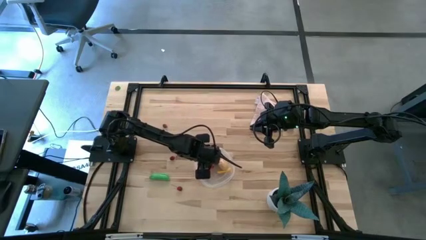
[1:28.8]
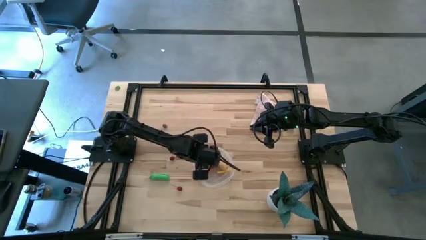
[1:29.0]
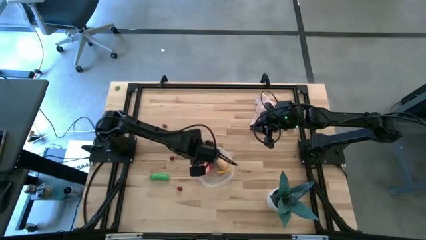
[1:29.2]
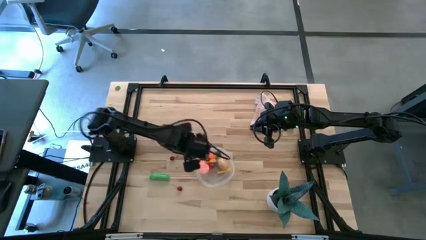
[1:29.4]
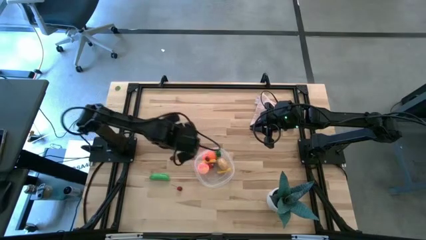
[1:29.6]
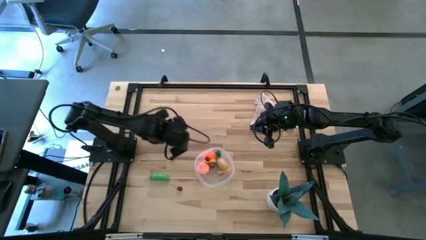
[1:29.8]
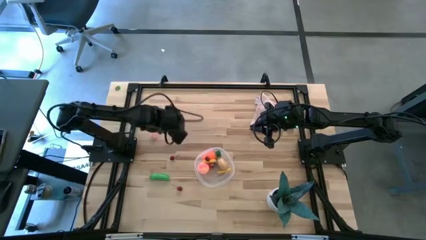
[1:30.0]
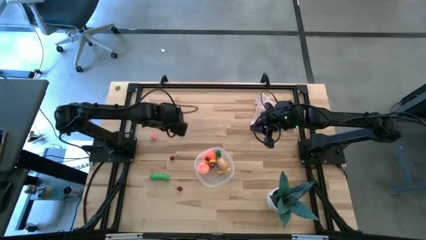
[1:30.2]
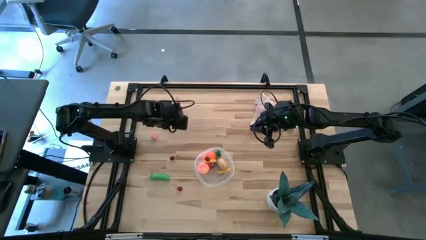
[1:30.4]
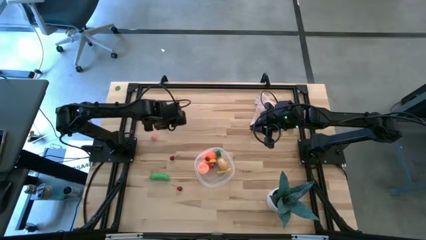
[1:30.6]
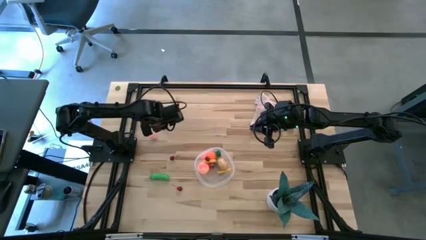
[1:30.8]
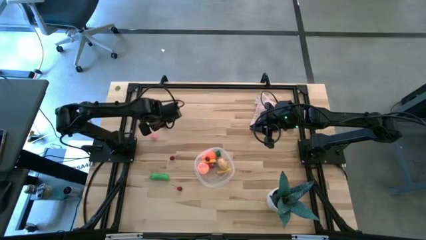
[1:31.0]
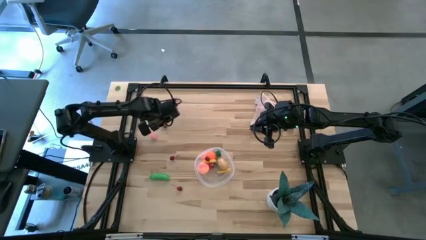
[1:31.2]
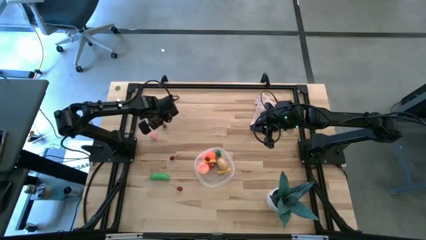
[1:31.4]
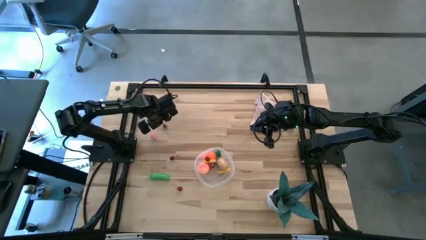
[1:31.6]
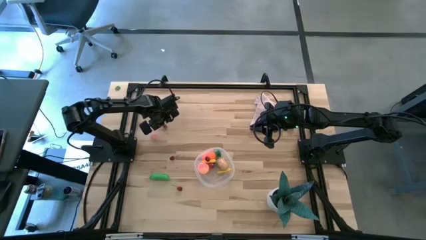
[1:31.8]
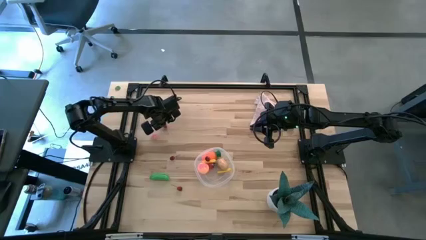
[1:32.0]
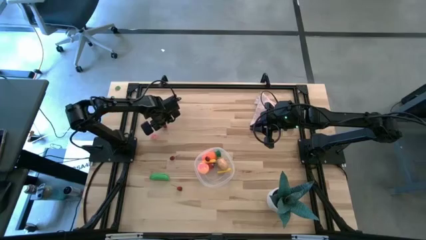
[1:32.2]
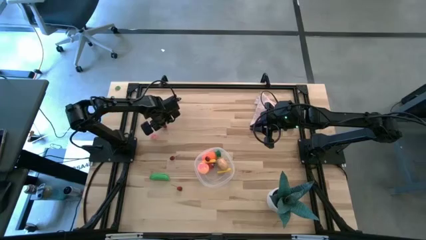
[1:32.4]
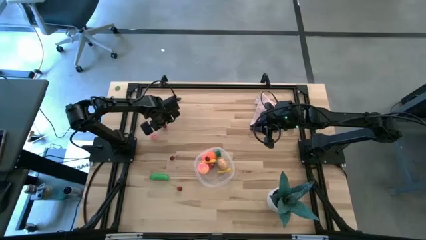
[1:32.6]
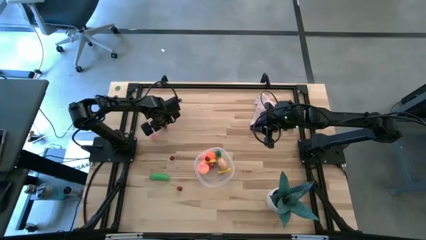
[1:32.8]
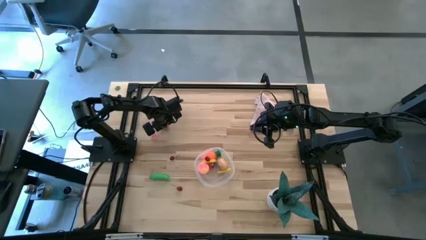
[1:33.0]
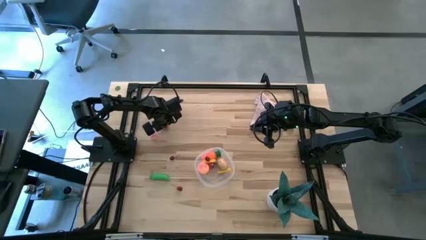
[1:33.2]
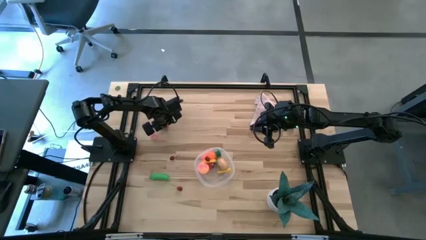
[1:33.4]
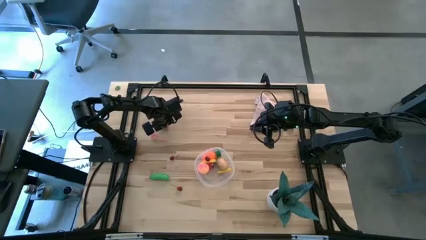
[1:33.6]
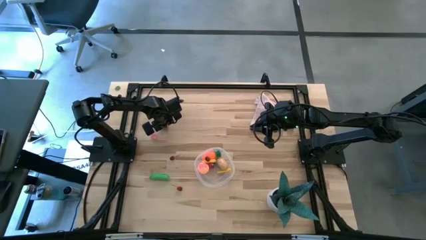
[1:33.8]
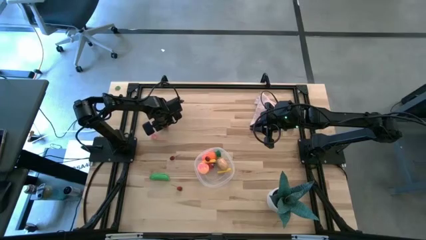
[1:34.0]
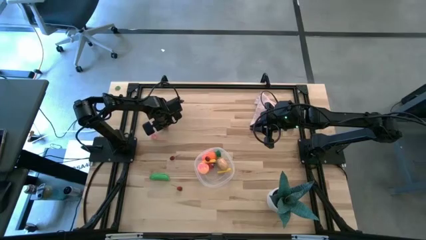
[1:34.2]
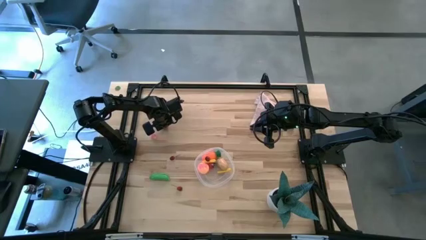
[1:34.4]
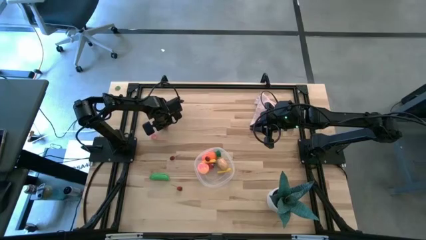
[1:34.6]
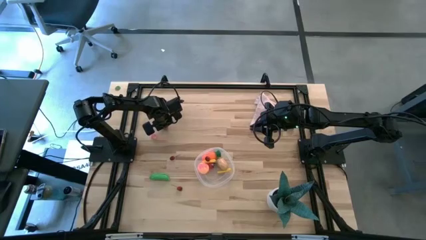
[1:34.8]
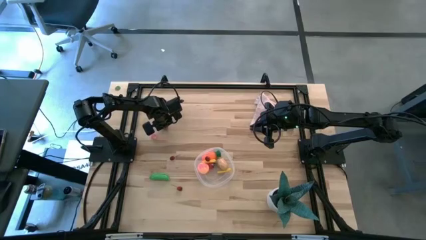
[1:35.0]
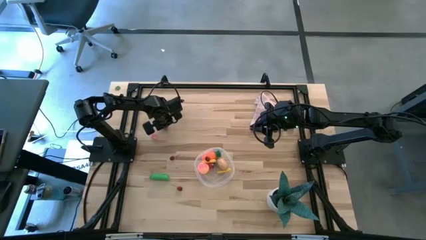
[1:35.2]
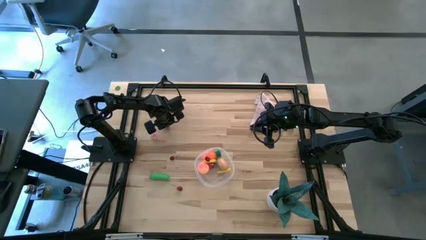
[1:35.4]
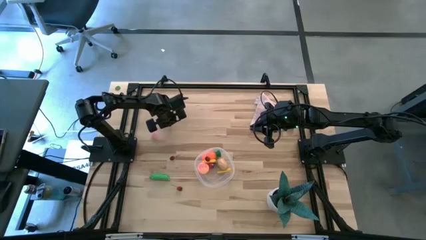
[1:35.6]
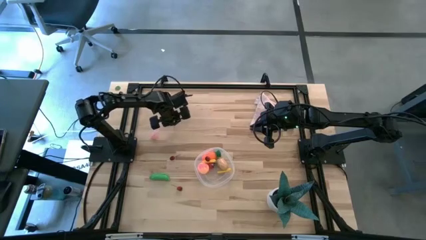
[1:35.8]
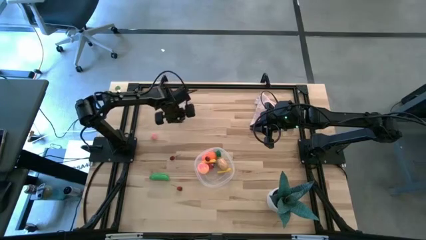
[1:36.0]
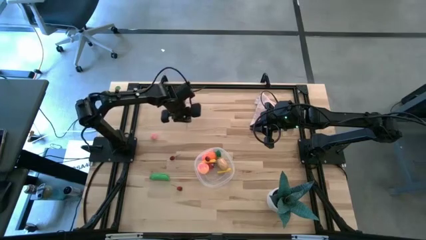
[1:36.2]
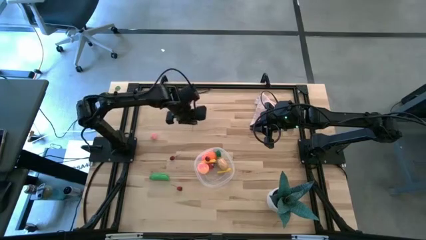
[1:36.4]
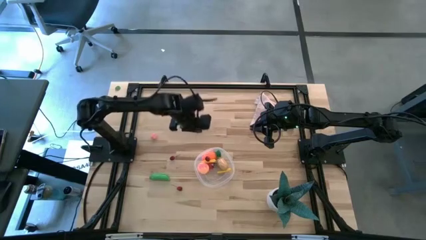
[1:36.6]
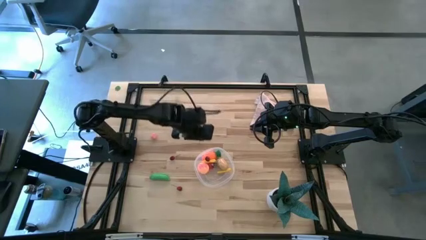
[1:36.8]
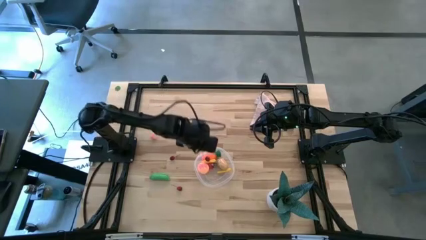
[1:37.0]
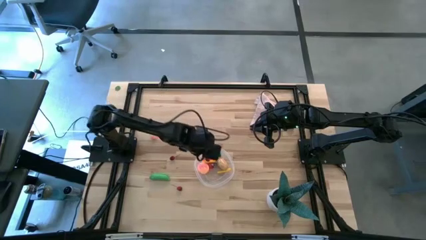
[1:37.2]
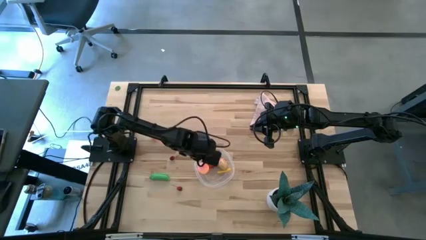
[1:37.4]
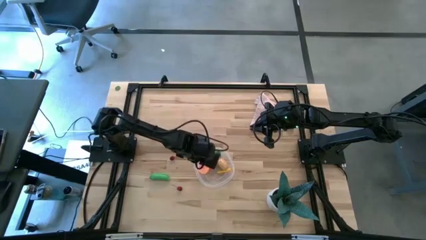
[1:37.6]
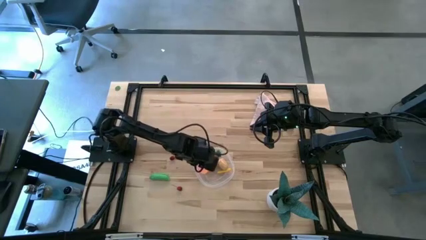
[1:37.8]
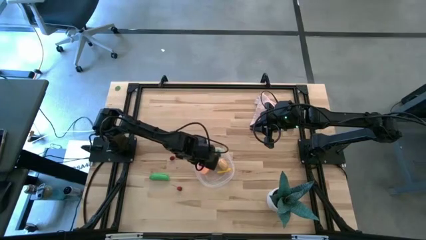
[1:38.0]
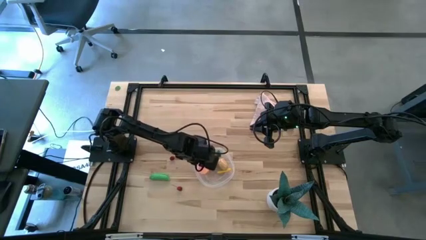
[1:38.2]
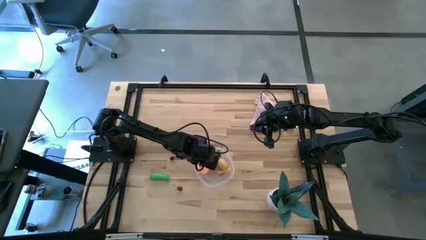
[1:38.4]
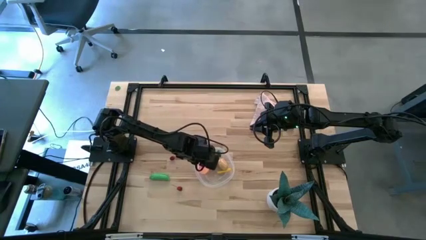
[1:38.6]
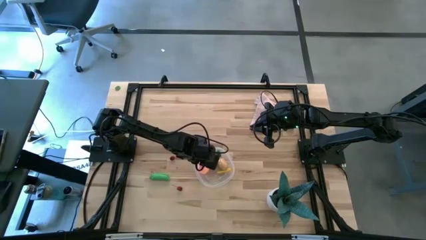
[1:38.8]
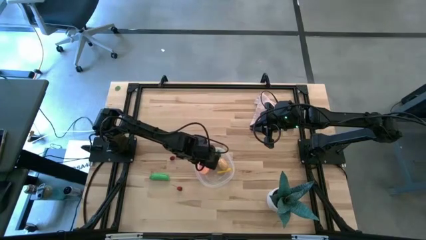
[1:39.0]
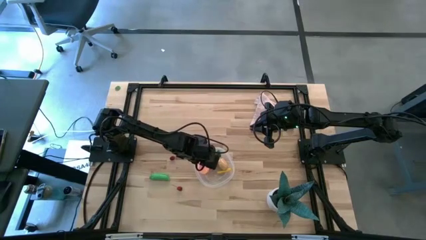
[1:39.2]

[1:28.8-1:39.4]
Task: Pick and placing Produce into tupperware
Put the cherry into the transparent bin

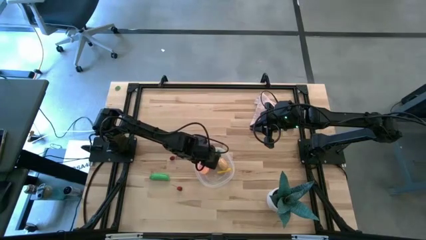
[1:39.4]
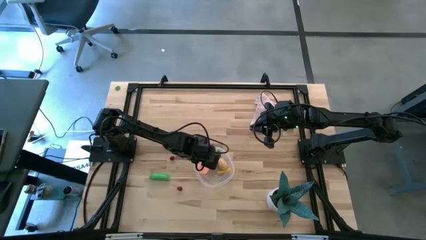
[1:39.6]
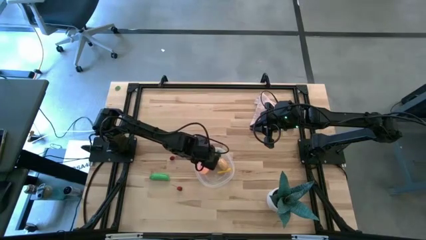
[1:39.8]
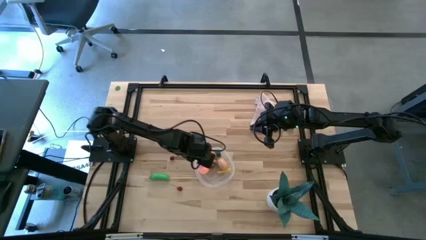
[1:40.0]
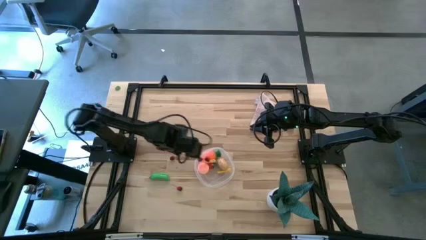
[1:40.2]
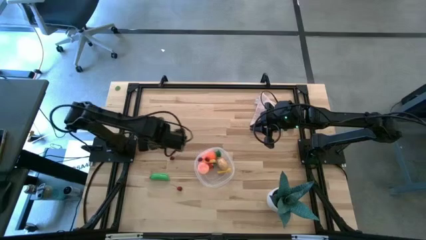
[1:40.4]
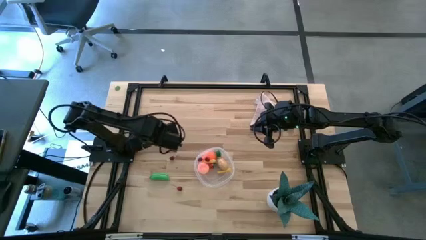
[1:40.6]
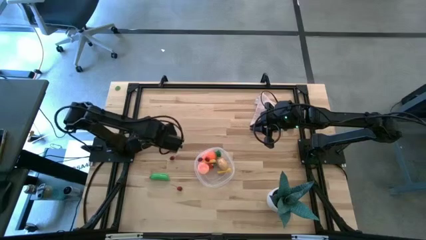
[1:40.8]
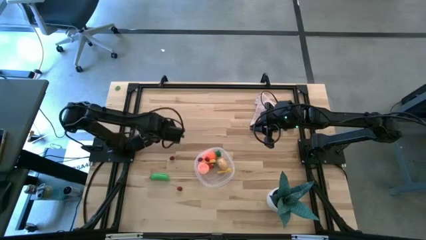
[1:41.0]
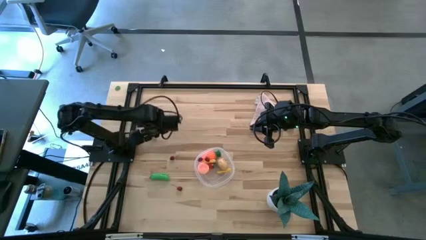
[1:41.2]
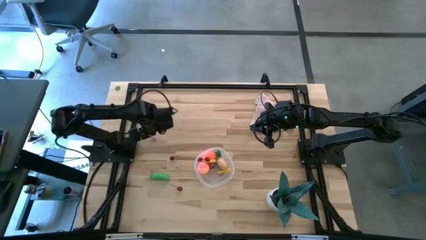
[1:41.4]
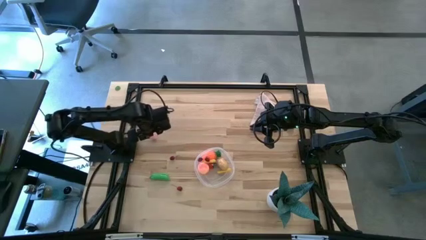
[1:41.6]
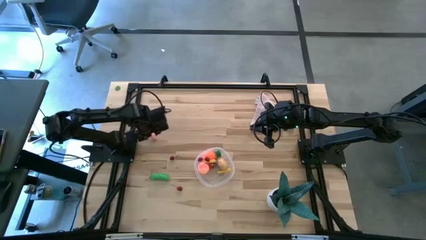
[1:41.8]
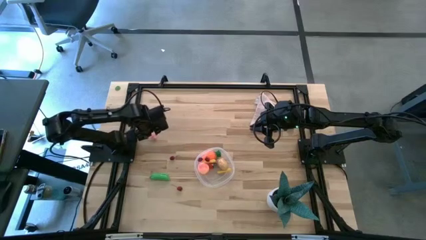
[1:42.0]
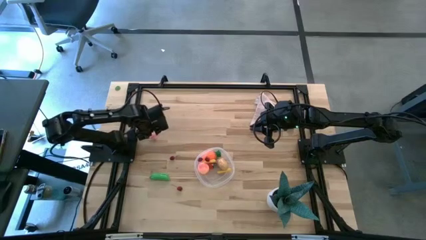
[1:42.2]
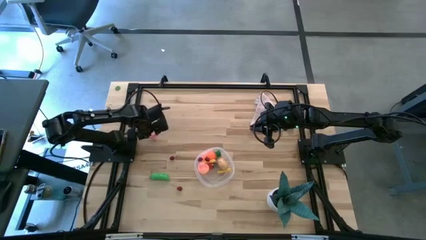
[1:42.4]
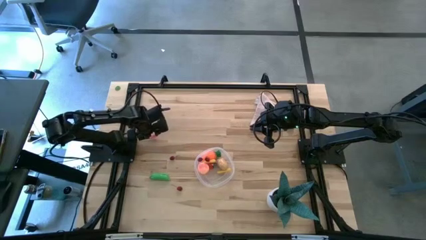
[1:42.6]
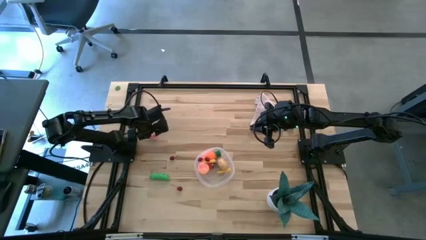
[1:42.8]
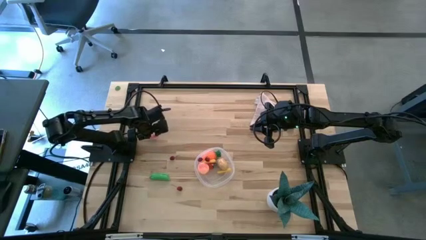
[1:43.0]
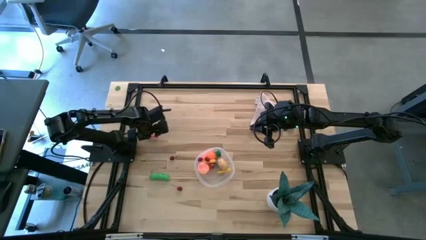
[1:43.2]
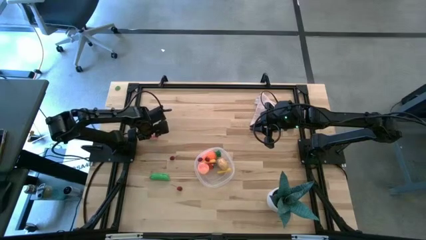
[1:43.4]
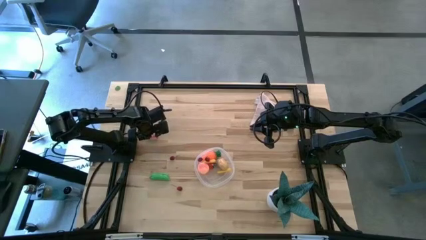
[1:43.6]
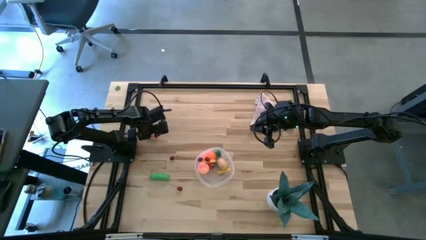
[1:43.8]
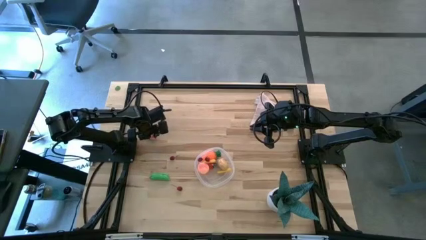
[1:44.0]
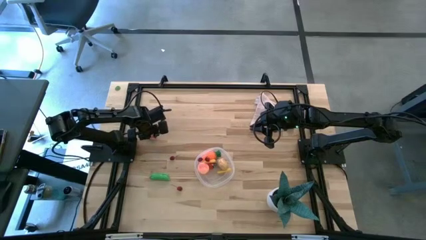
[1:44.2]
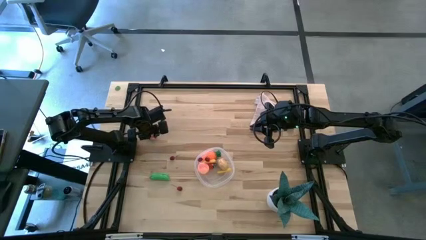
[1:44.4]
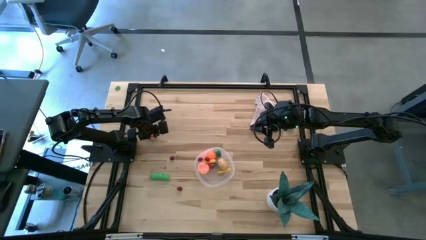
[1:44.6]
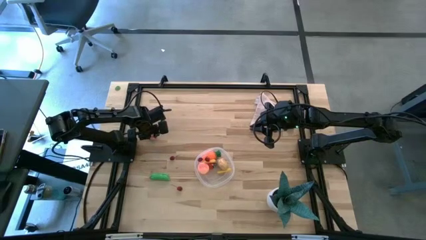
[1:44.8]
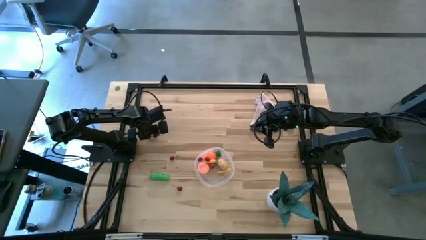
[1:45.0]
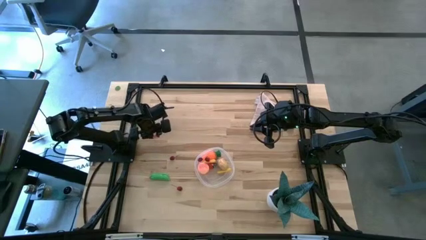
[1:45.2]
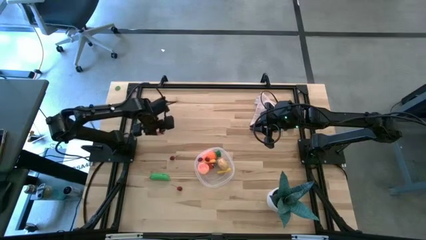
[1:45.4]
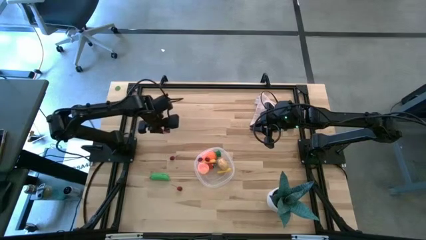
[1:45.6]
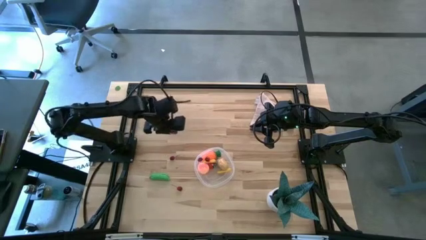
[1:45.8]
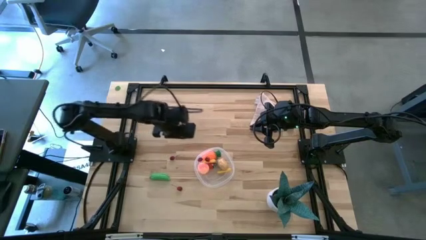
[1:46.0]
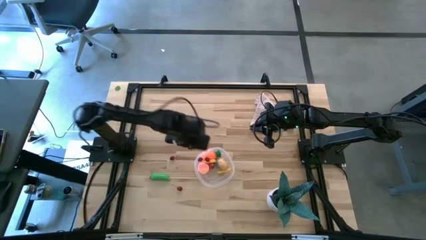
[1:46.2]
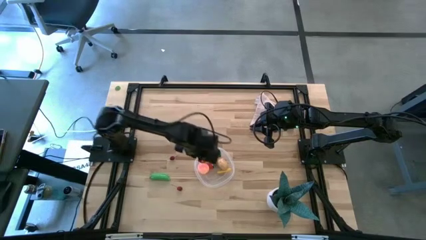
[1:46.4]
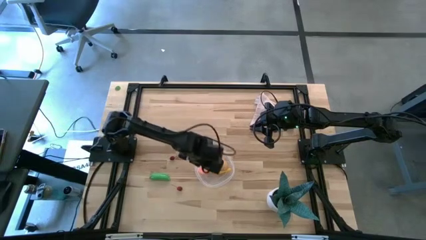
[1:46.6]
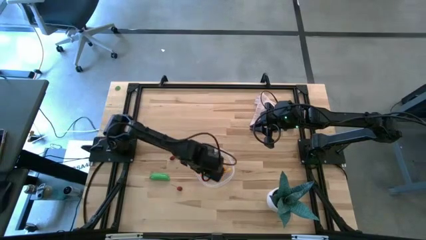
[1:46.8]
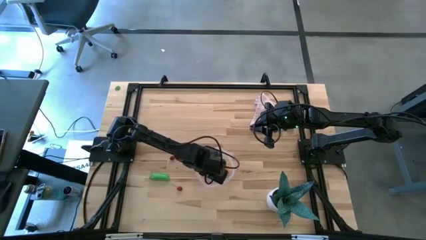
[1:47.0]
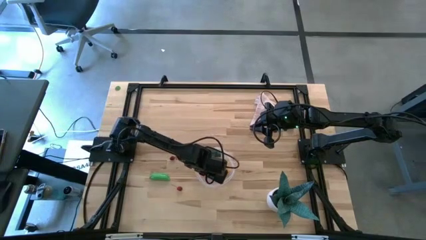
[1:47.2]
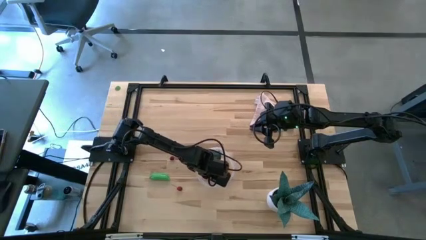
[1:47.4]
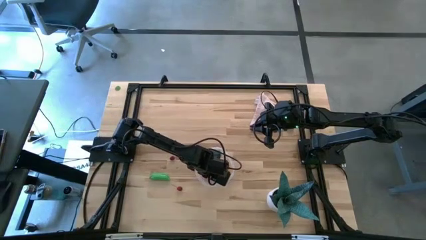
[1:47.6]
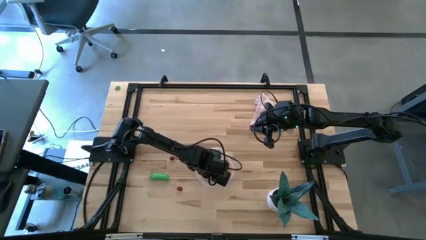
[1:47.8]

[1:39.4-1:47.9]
Put the peach into the transparent bin
